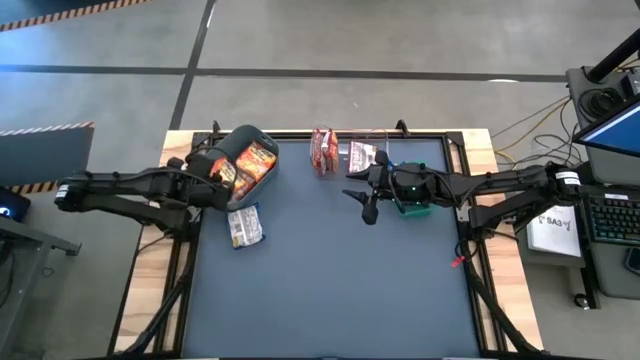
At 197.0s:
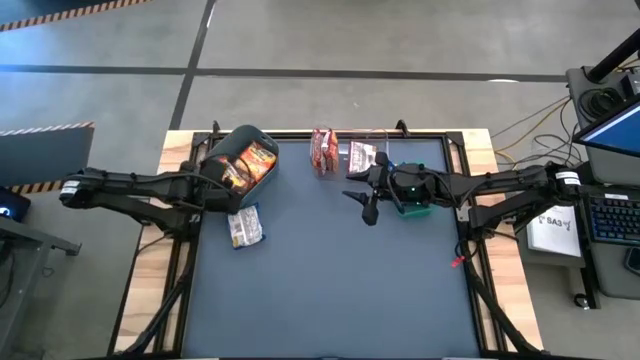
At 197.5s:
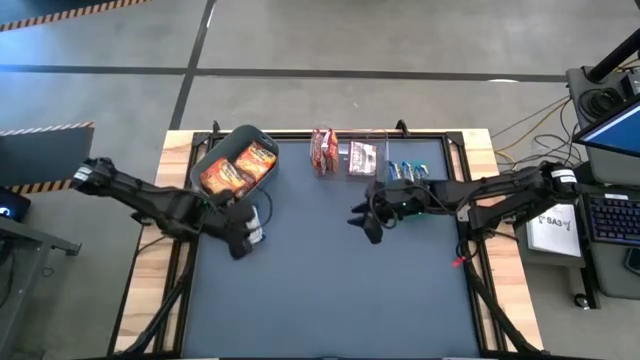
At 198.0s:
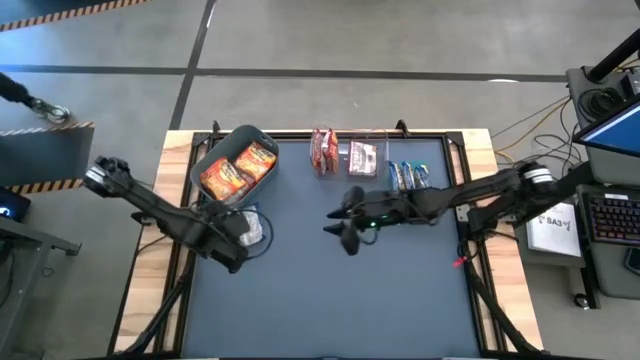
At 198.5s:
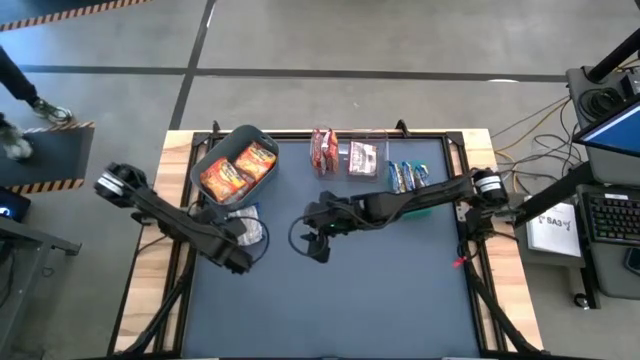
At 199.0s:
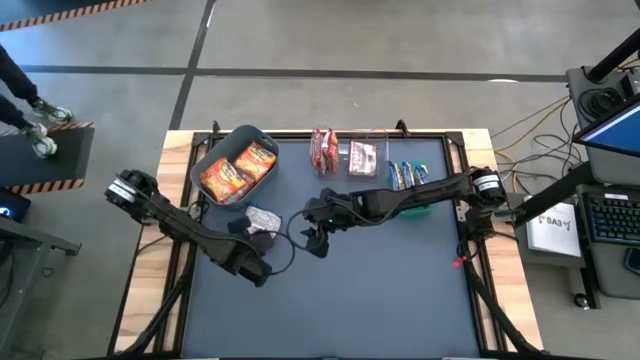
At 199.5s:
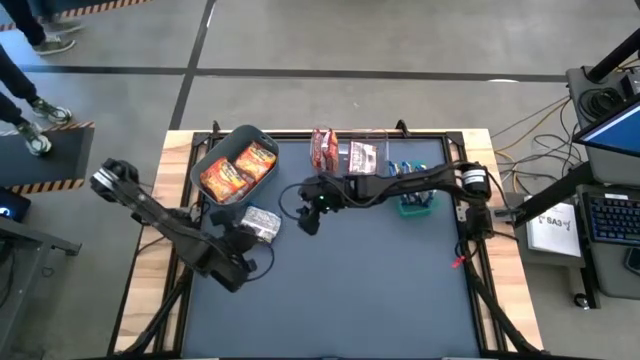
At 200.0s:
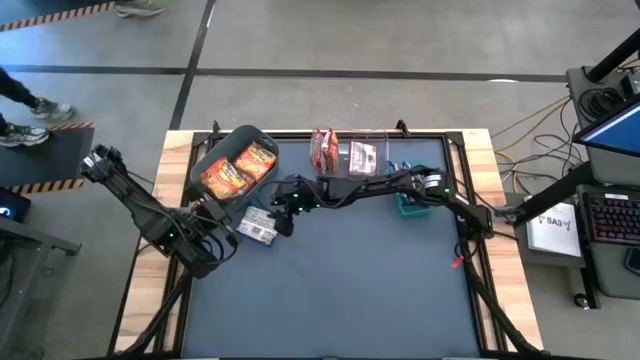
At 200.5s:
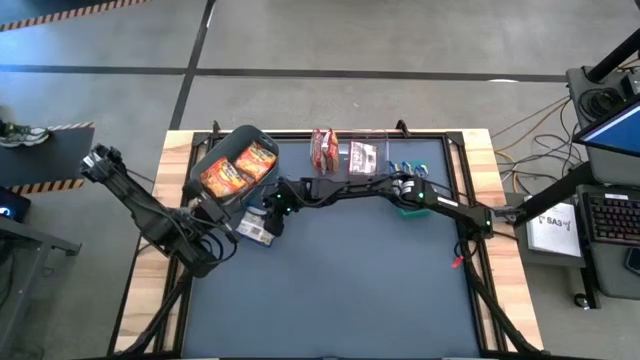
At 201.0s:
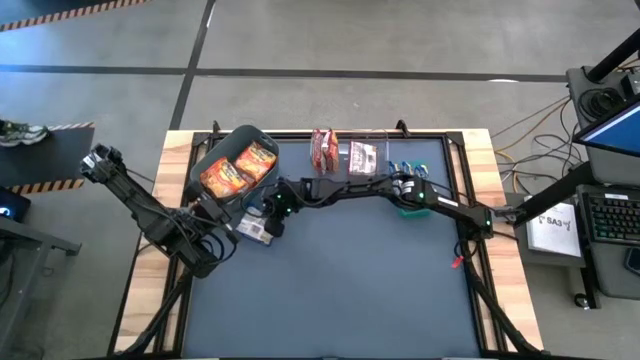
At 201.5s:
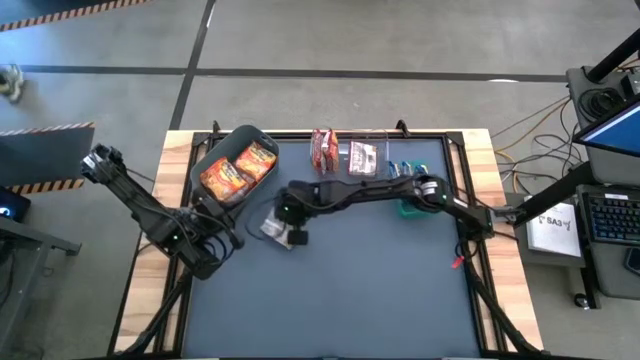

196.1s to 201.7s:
Task: Sort Maruchan noodles
Put the blue noodle pack into the transparent bin

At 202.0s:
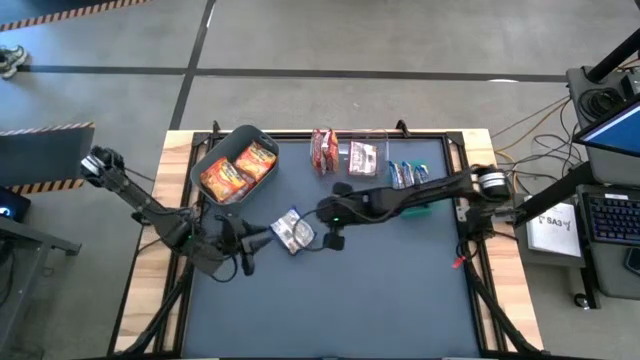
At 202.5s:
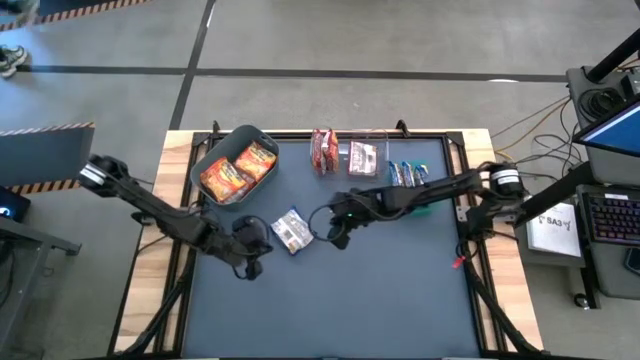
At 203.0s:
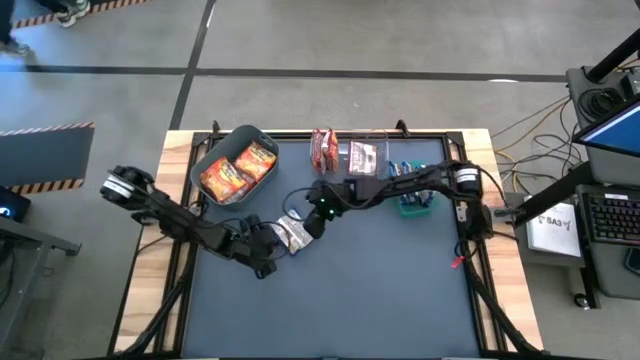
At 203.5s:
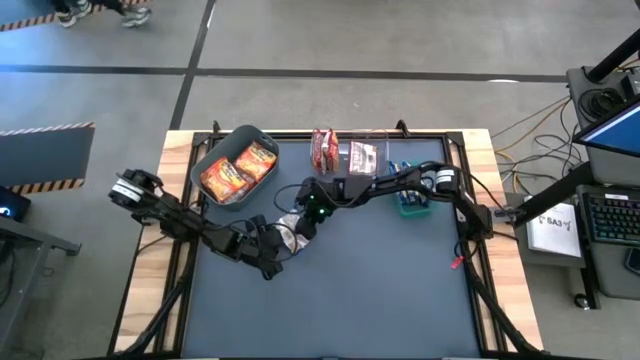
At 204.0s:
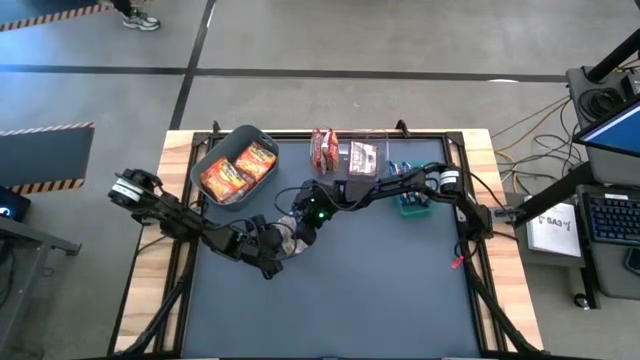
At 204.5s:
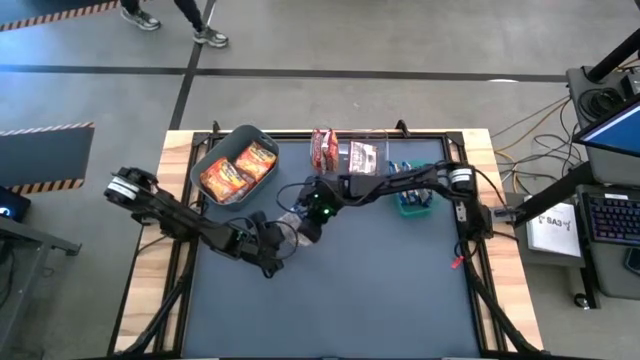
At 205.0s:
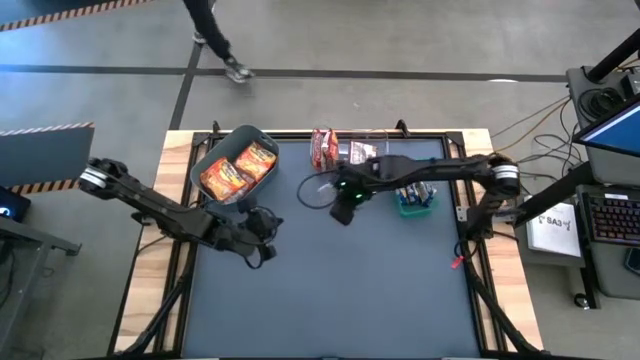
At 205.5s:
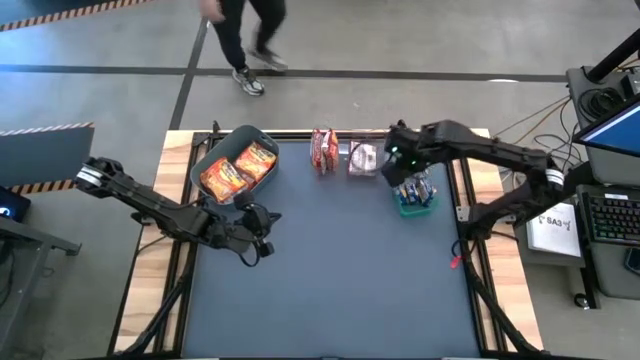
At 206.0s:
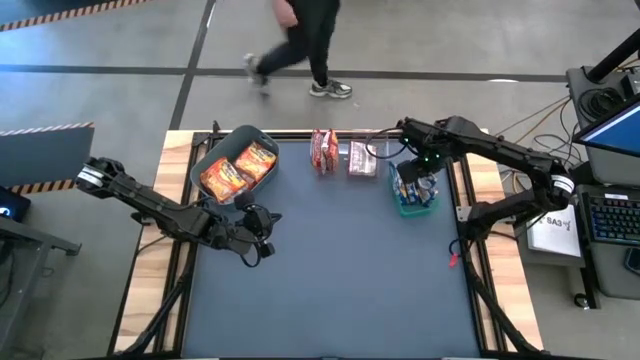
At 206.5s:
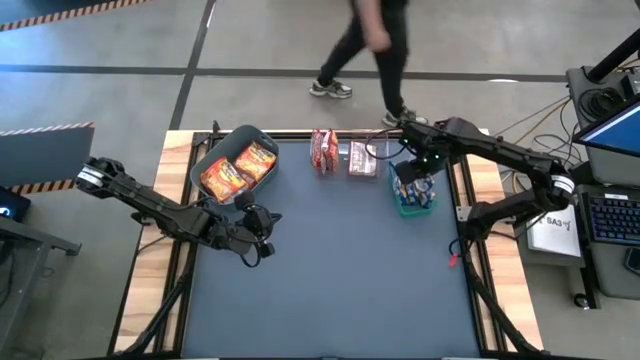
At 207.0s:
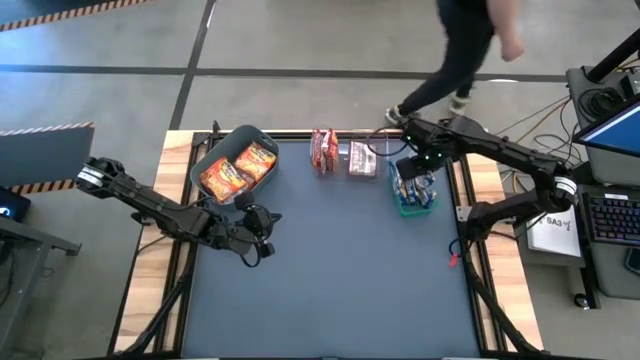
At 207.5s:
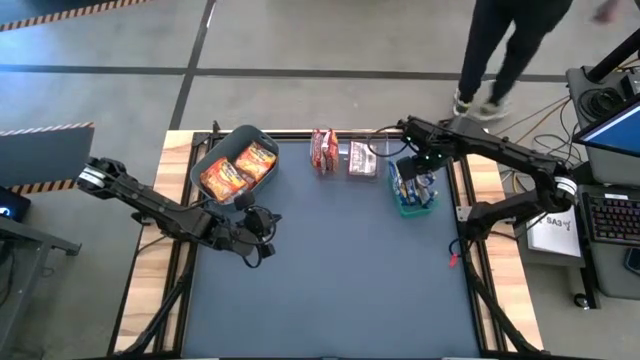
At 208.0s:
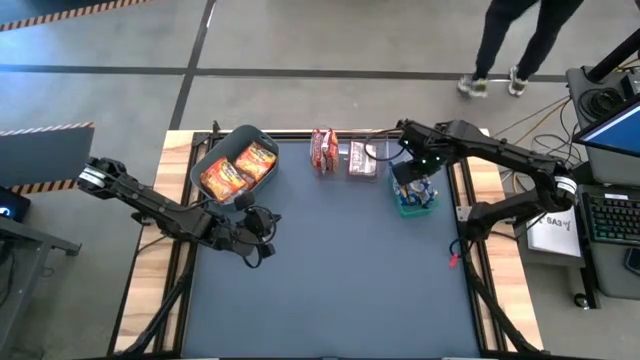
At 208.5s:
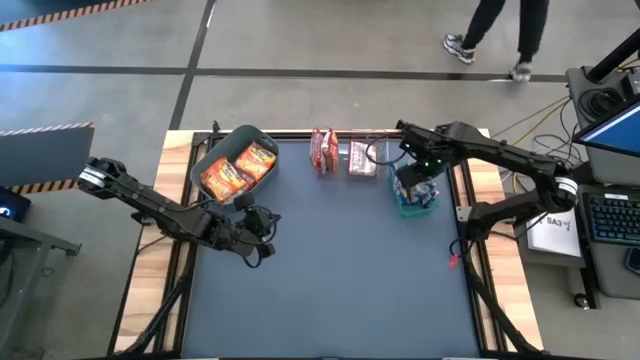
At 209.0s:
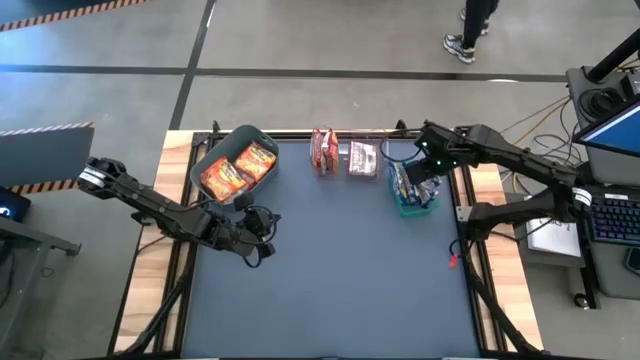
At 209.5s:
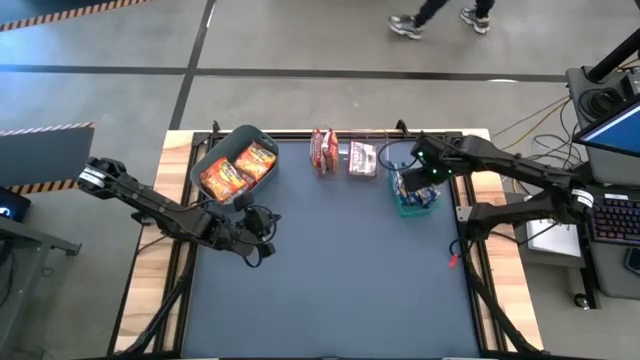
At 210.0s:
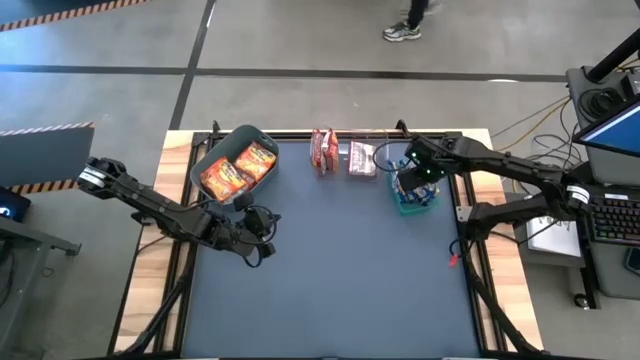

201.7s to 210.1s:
Put the blue noodle pack into the transparent bin

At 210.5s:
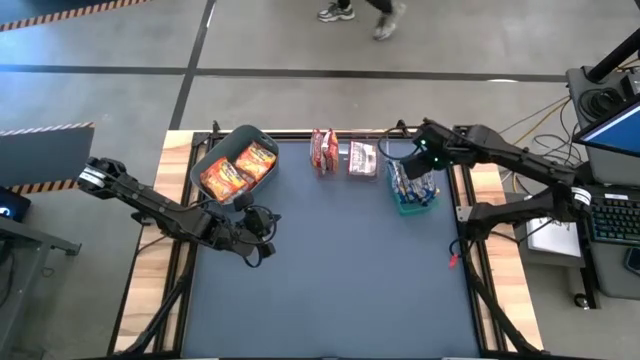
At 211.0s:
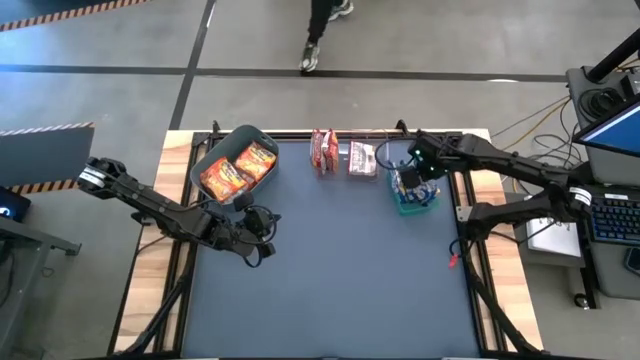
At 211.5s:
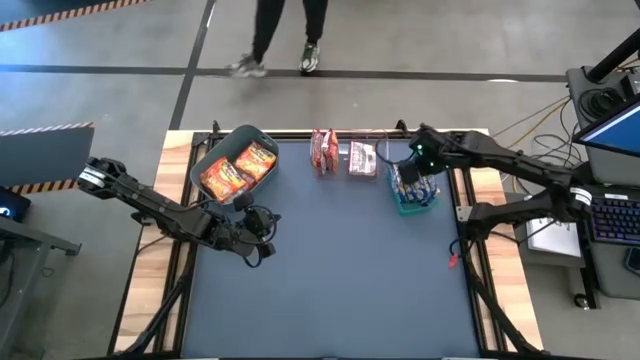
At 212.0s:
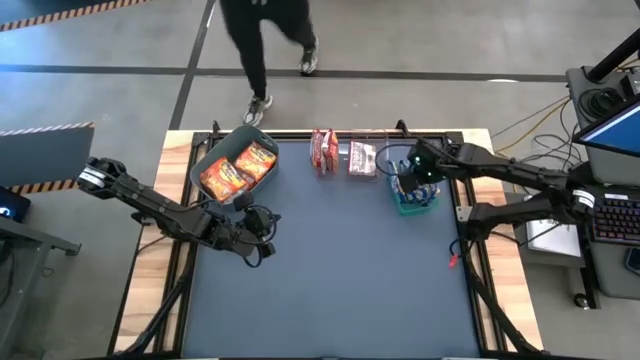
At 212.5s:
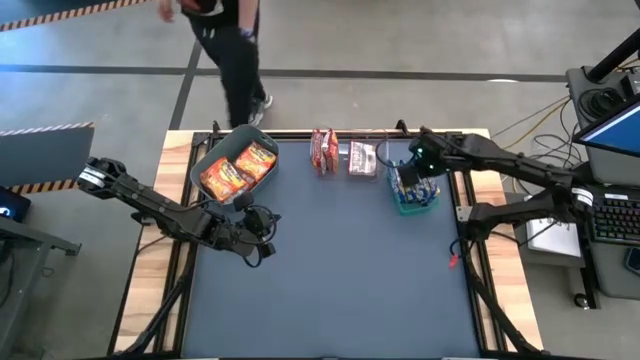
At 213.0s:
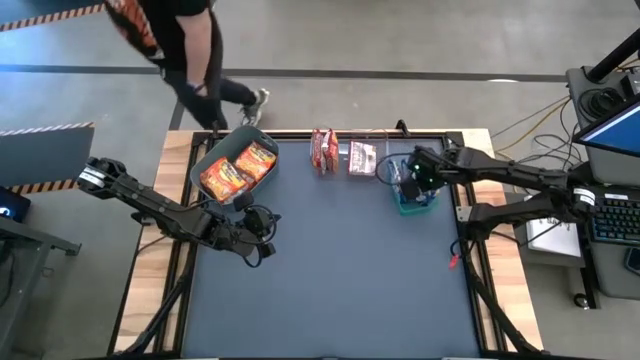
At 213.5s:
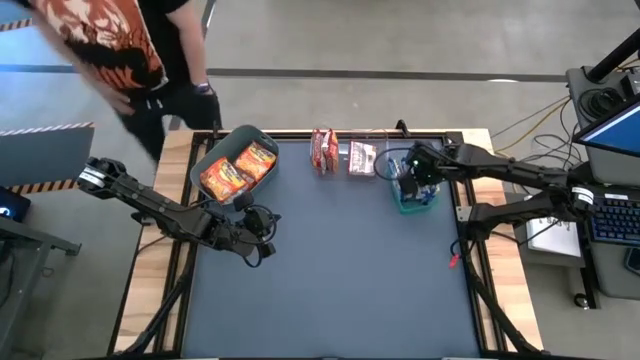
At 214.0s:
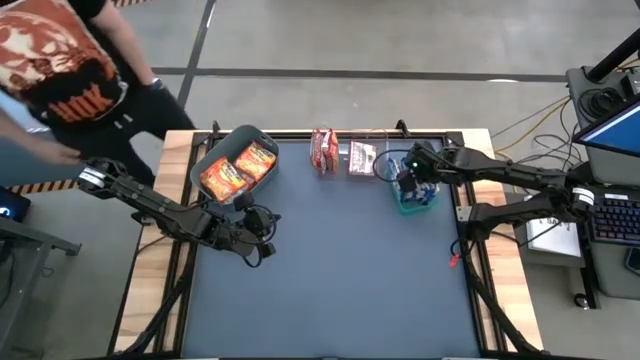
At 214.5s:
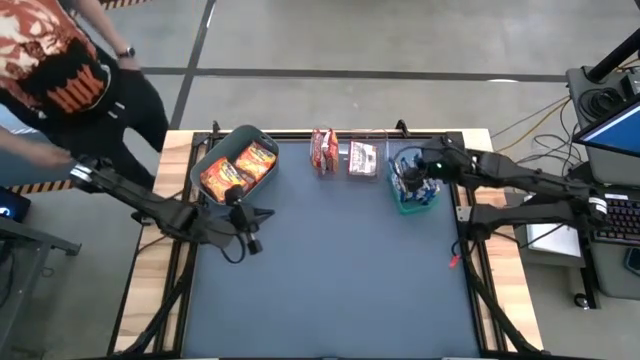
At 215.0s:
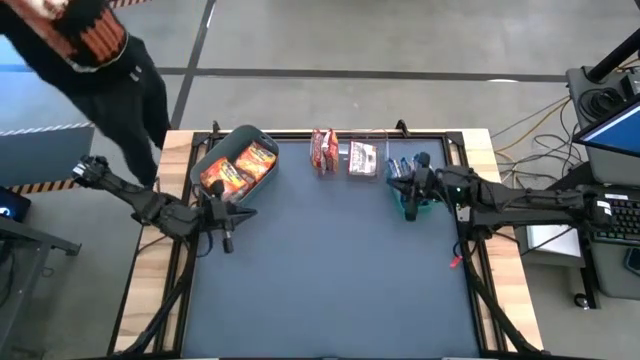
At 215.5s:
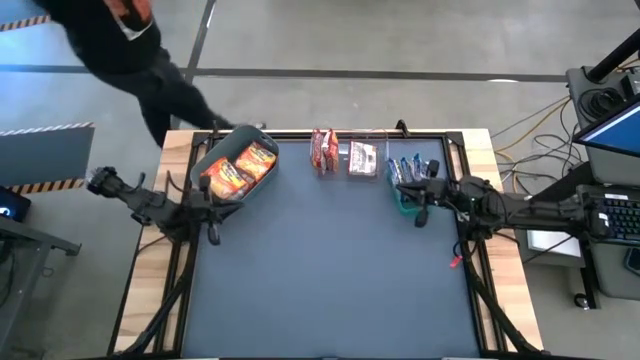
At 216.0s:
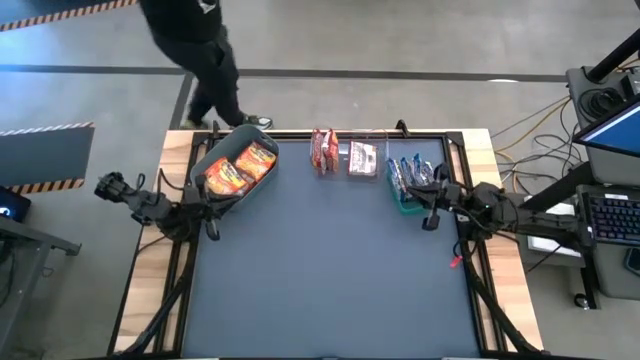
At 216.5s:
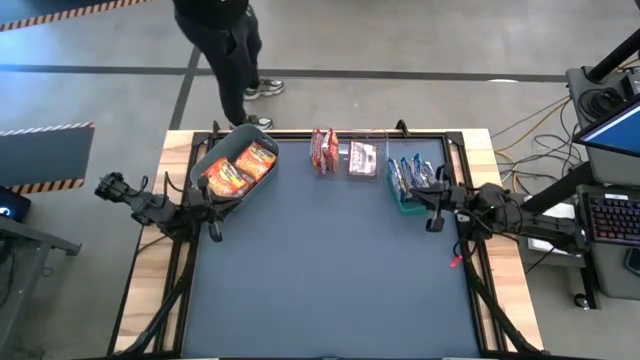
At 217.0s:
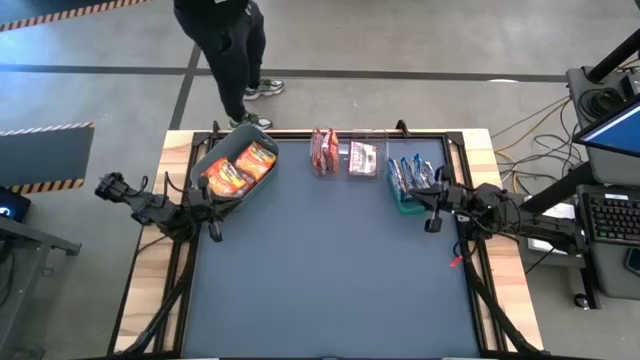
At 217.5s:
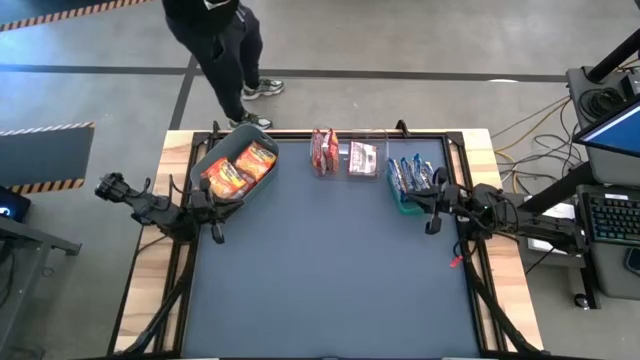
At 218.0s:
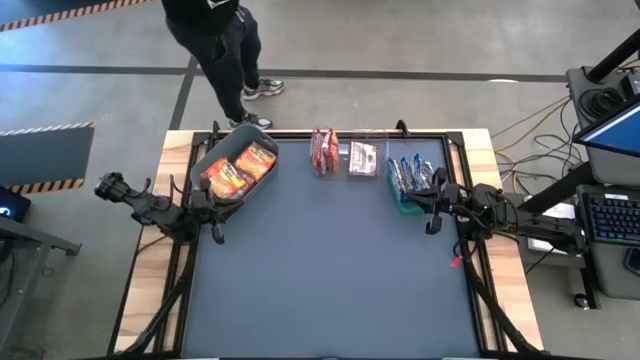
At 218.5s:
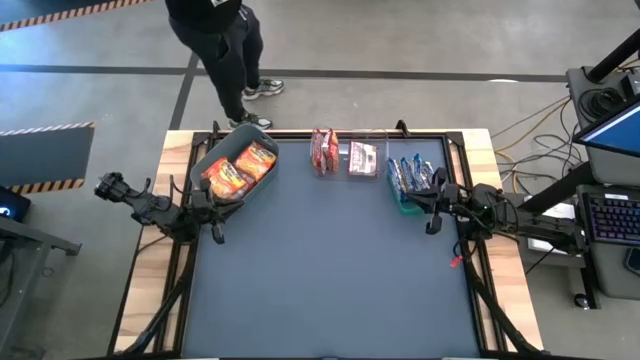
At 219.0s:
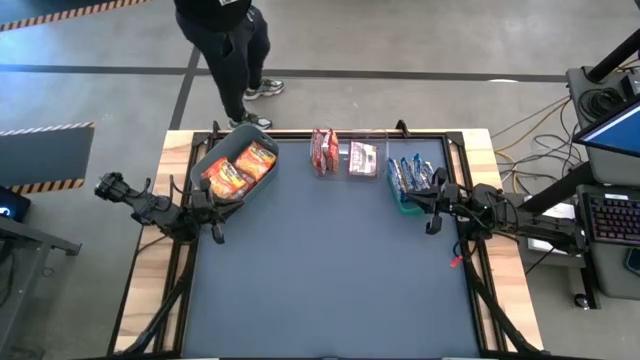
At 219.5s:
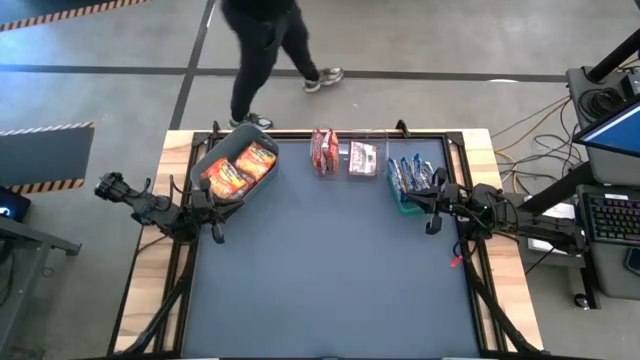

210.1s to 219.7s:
Return to Home Position
